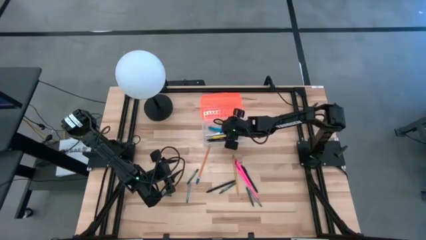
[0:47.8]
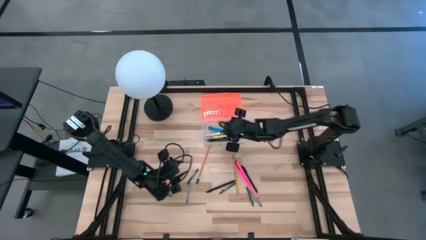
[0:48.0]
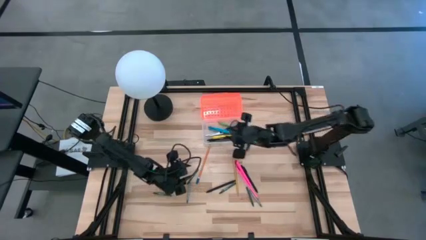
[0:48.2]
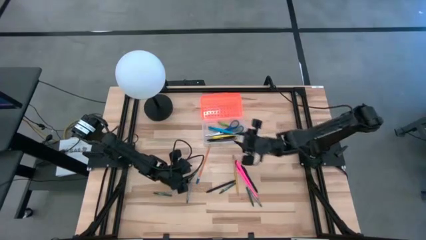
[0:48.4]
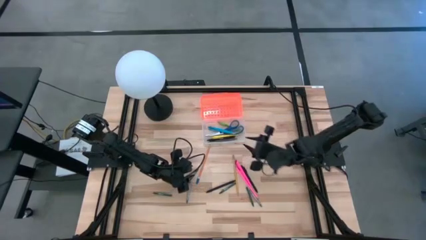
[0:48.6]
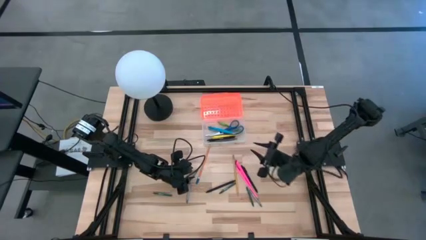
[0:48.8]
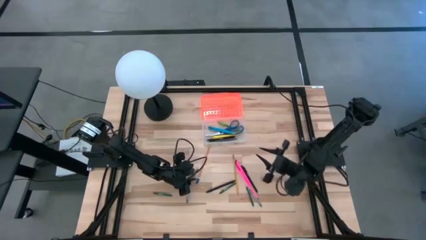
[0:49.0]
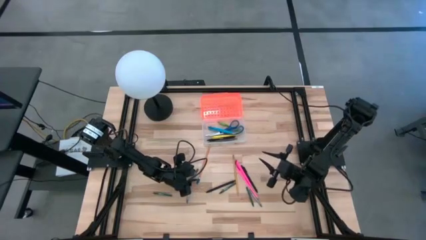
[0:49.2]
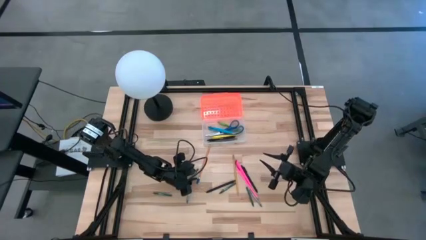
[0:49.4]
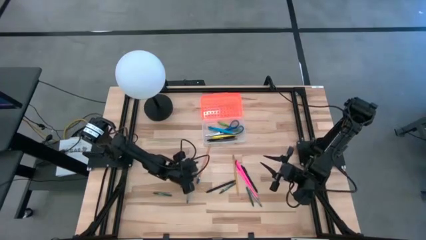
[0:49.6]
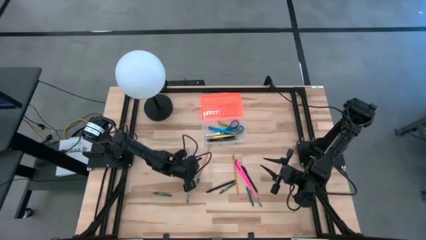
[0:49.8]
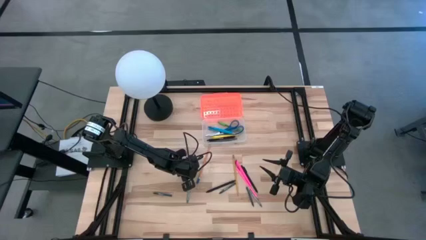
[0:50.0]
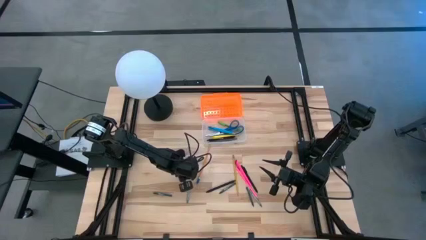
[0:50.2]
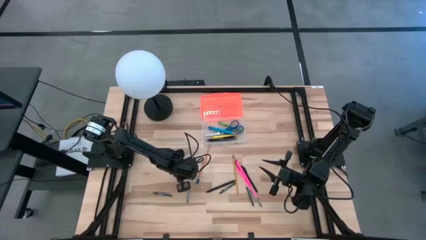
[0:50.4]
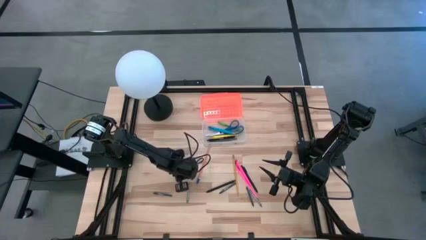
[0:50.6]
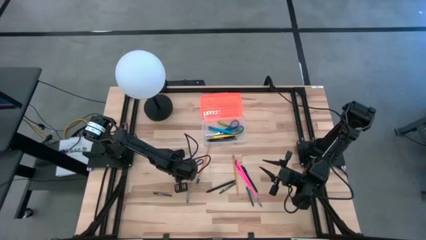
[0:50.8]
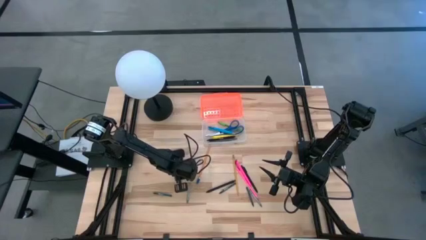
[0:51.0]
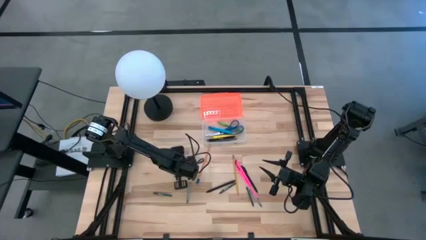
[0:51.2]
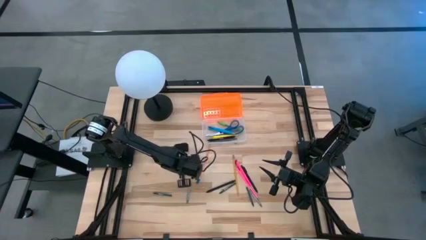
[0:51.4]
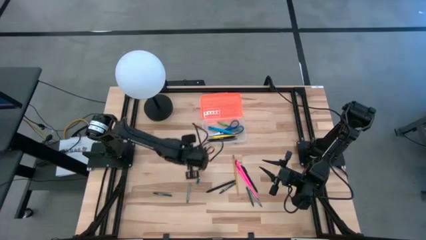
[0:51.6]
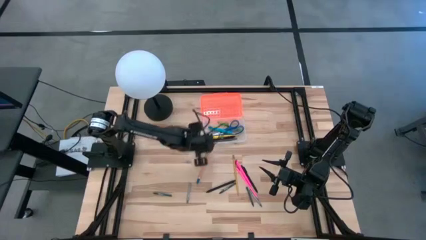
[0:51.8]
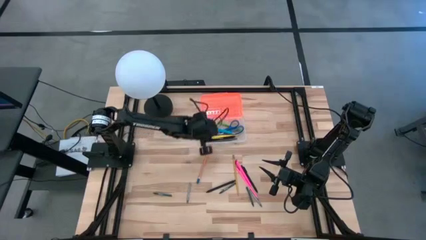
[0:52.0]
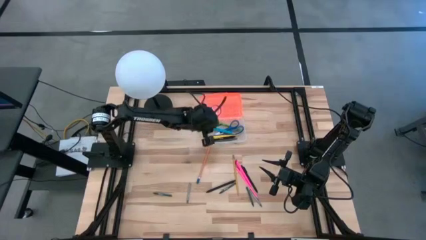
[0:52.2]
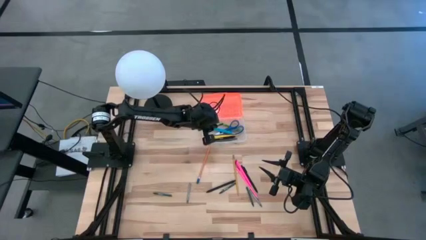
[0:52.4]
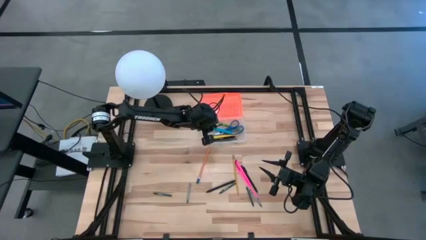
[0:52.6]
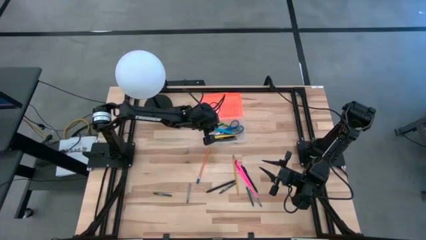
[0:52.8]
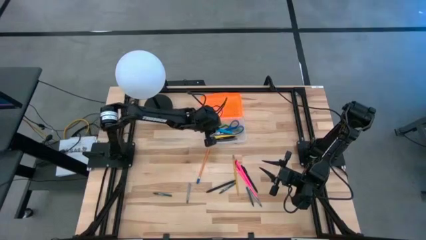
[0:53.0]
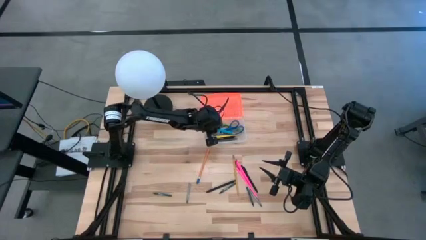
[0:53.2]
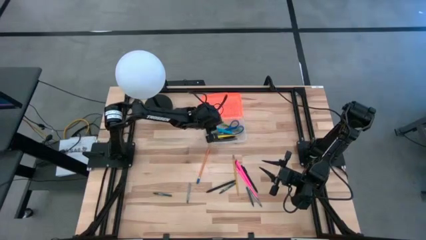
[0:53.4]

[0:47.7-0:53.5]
Task: Pick & place school supplies into a supply box
Put the green crayon into the orange supply box

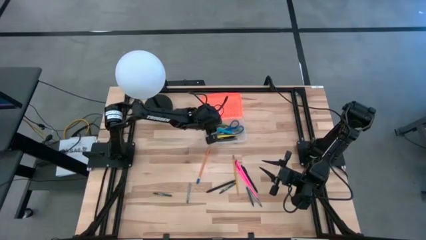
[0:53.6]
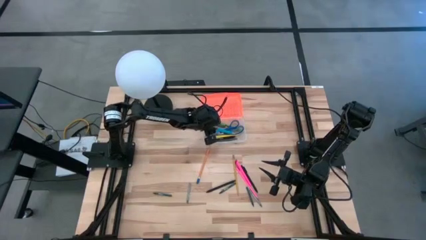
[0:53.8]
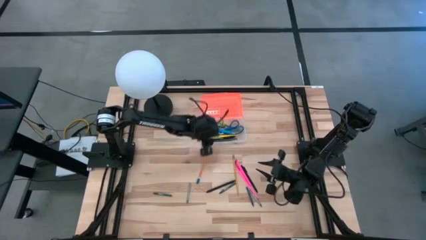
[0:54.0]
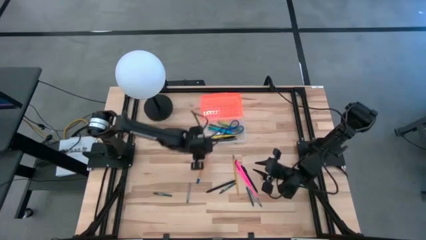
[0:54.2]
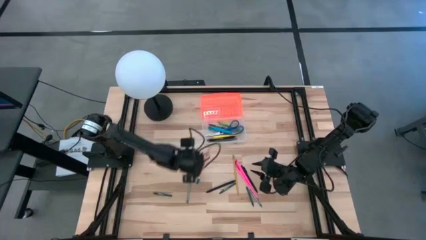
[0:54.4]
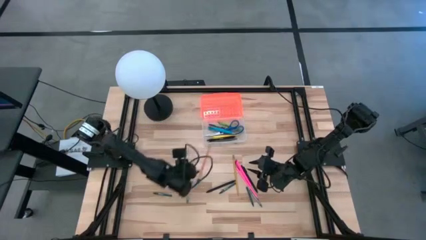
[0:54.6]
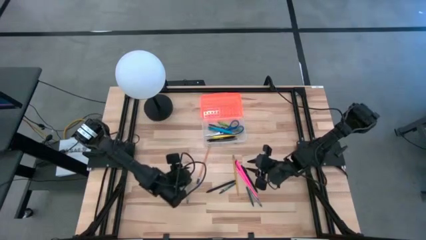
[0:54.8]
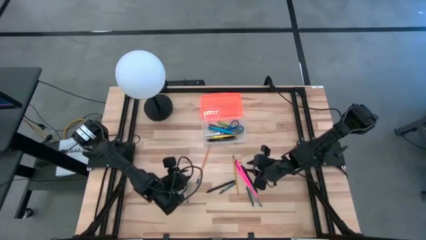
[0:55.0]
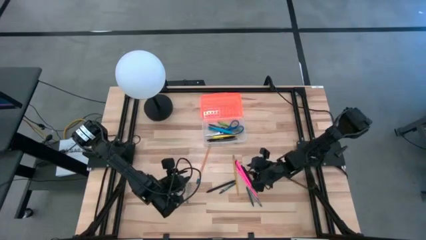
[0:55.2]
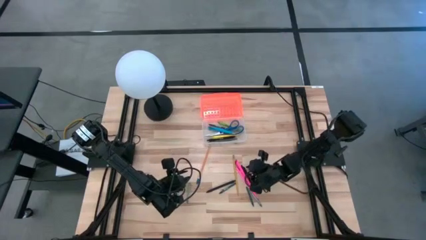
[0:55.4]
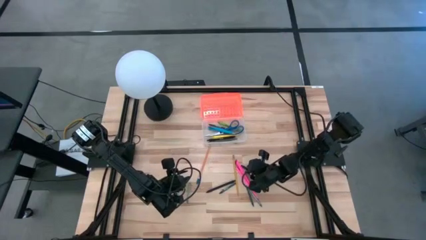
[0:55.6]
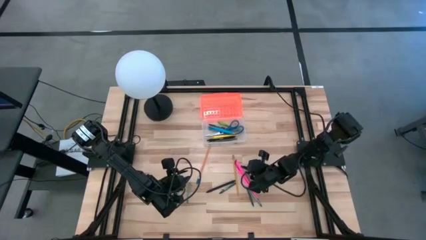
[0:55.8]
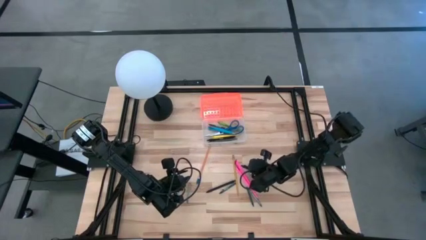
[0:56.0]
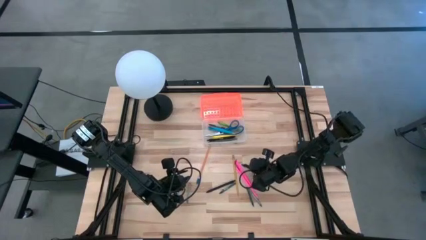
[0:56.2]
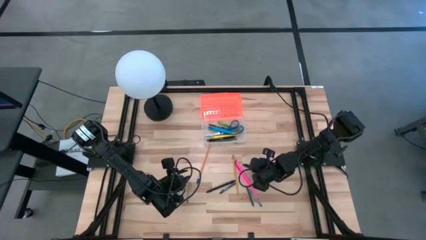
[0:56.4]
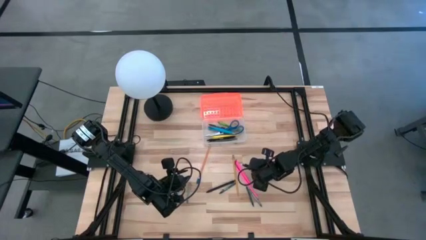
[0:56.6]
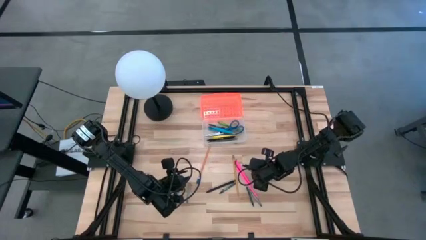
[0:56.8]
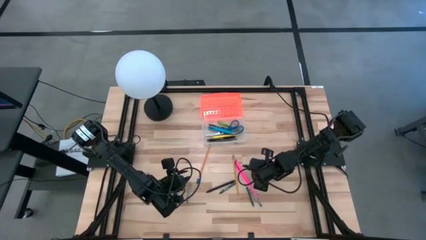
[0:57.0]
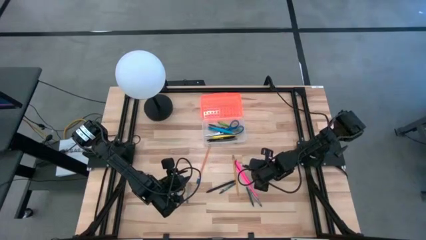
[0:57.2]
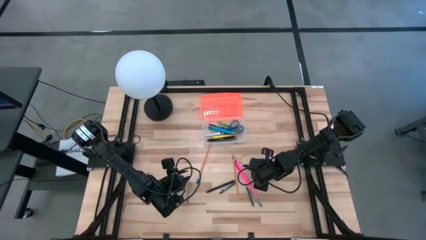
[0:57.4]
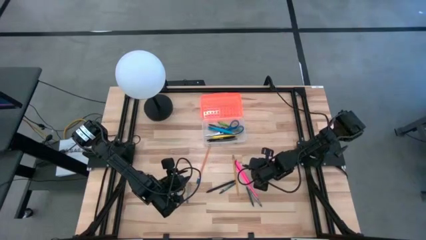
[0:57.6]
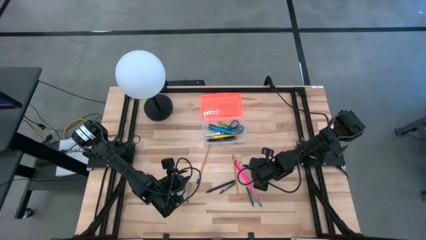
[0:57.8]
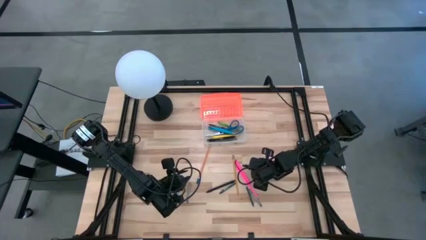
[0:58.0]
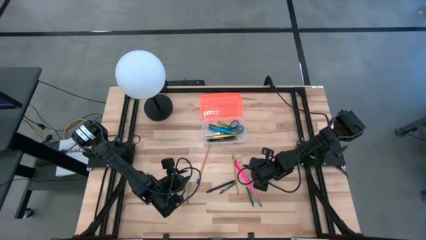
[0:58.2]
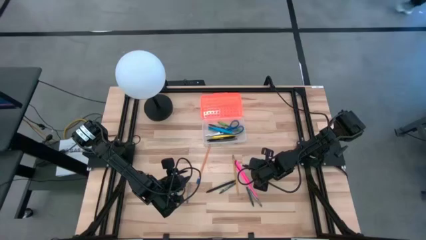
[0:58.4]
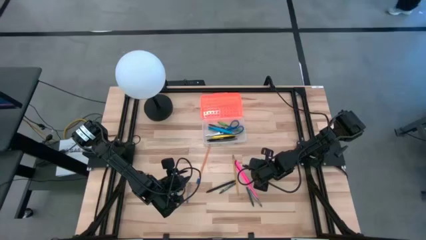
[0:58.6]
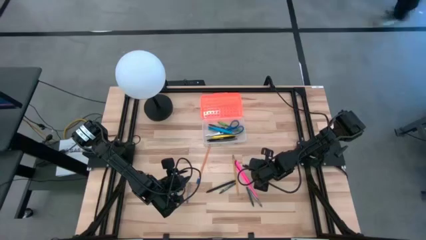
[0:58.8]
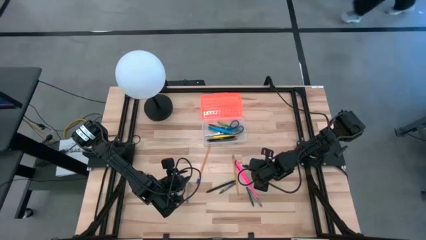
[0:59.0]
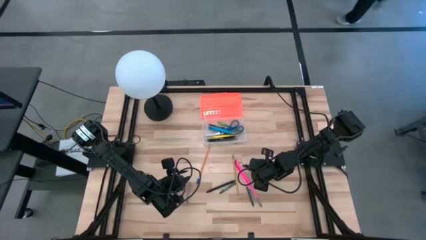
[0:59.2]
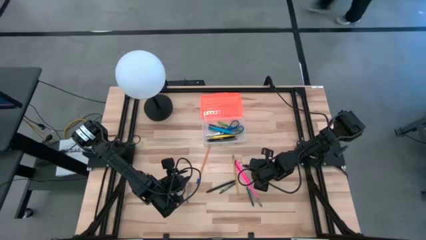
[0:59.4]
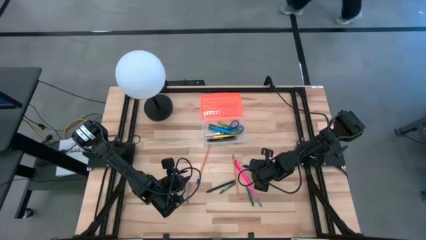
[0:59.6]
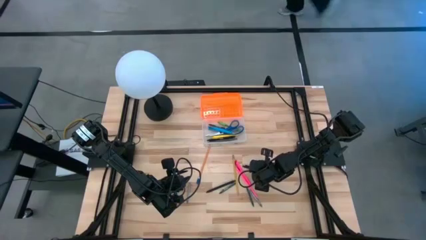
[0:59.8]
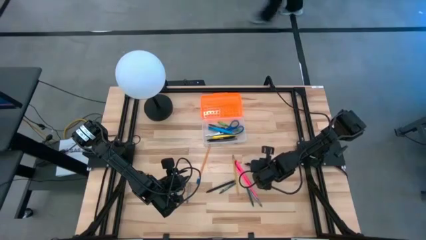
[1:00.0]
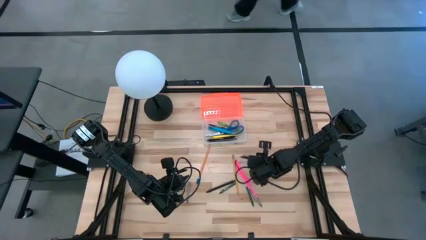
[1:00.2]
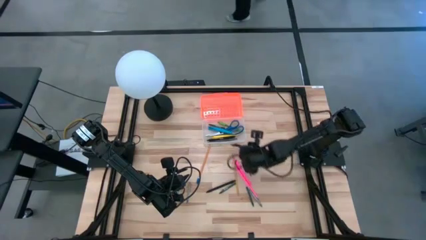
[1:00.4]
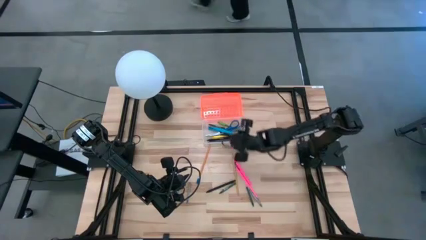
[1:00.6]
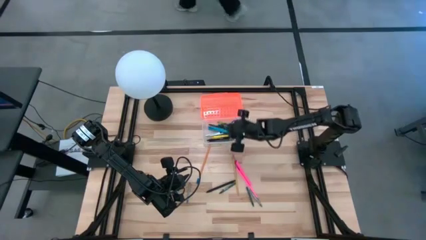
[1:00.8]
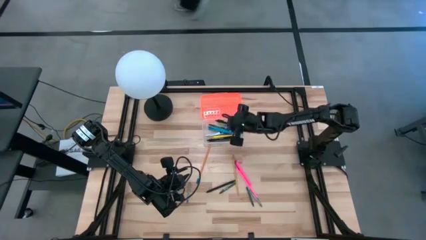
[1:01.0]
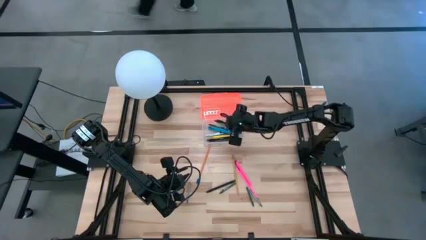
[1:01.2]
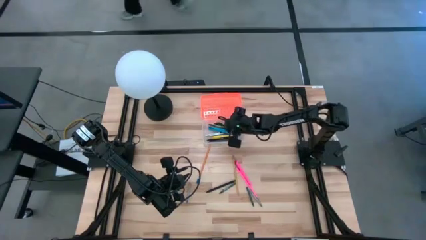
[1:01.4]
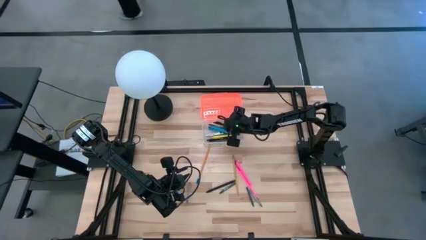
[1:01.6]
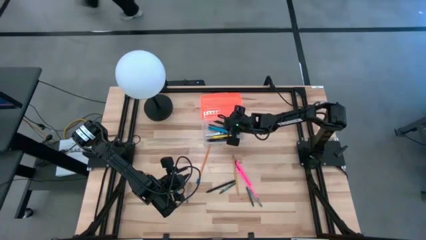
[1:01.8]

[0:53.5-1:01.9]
Put the black pen into the orange supply box

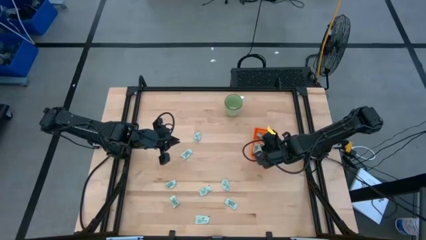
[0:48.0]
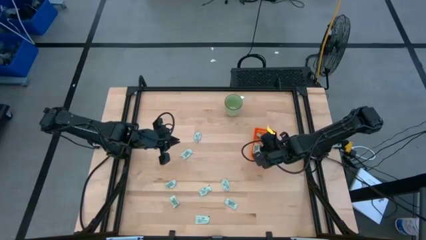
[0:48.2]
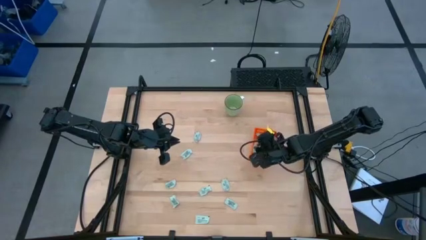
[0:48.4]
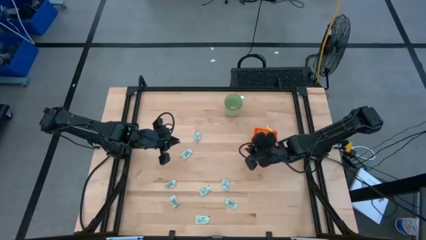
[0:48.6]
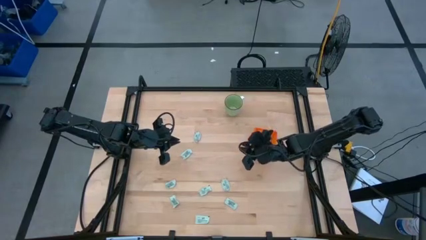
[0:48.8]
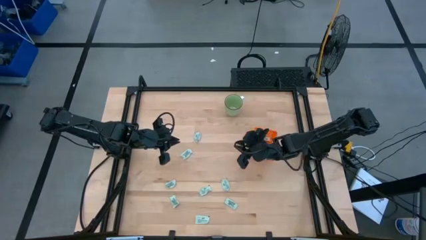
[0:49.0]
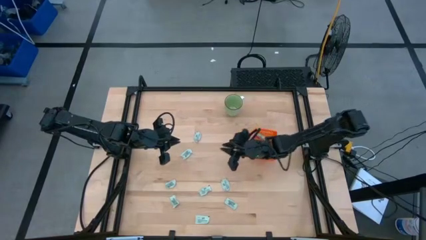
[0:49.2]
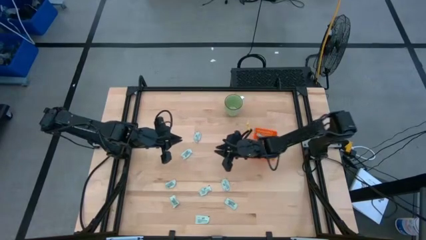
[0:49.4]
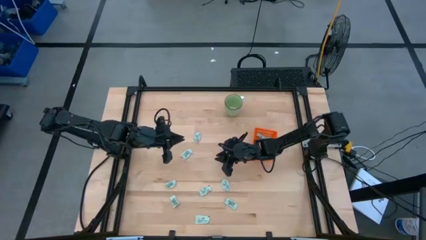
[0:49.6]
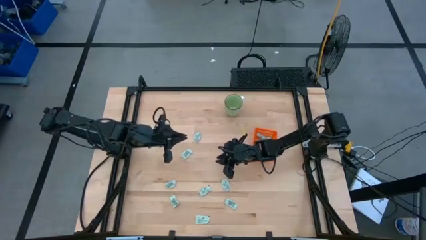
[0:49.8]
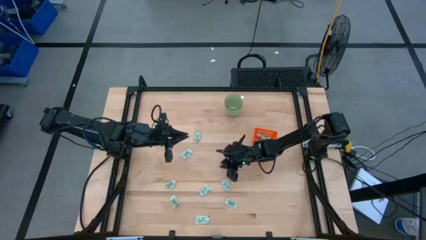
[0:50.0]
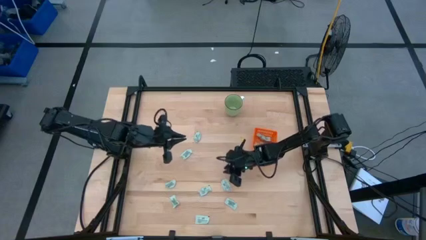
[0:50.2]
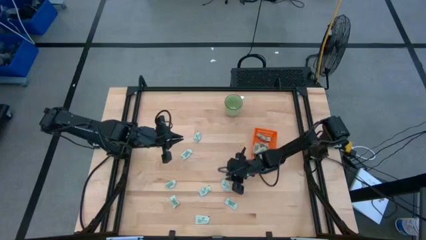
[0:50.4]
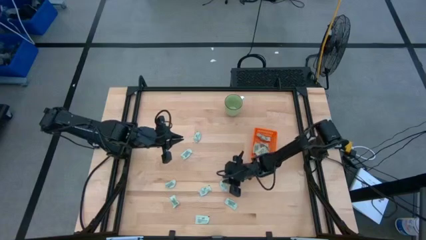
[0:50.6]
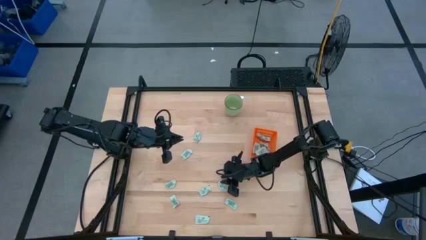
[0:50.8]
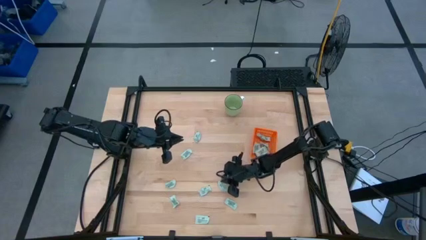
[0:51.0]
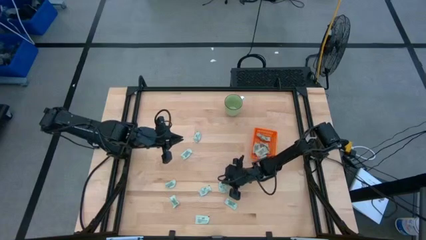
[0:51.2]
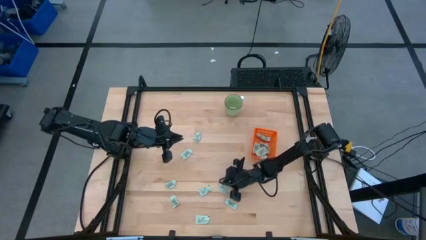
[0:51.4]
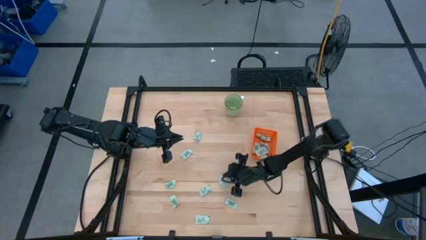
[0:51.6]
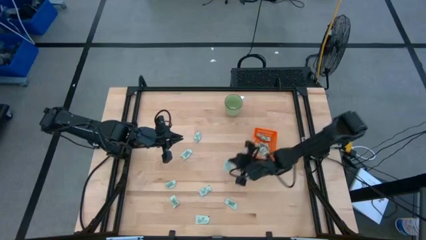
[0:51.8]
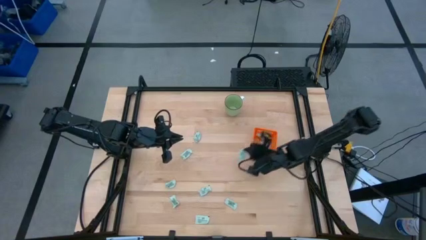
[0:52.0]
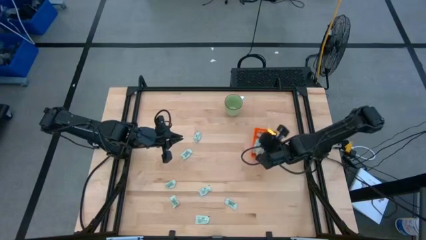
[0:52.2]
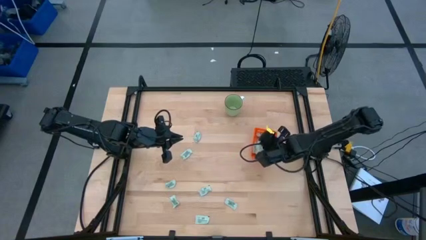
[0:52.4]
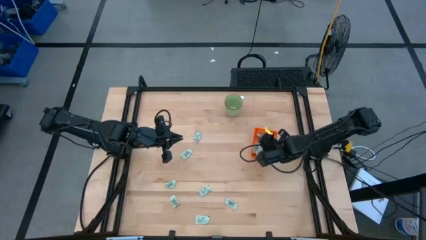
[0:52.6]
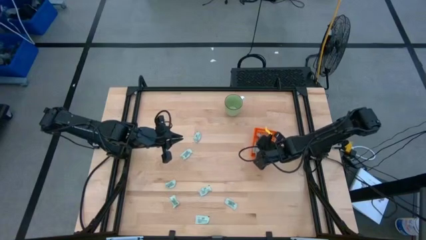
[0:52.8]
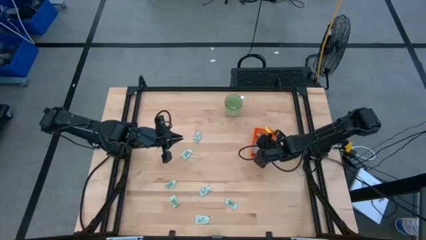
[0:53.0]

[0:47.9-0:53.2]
Task: Pick and place Stevia / Truvia into bins
Put the light green packet into the orange basket
